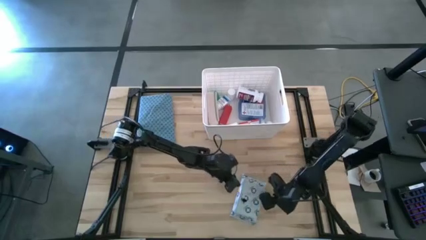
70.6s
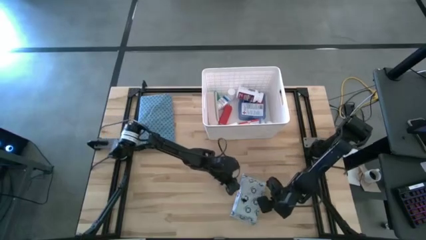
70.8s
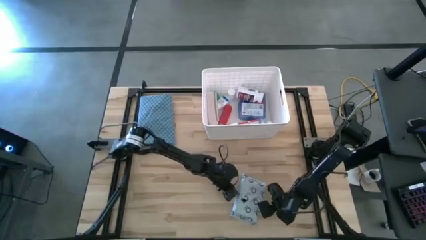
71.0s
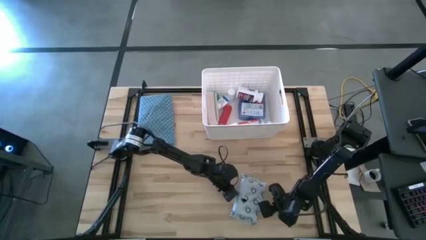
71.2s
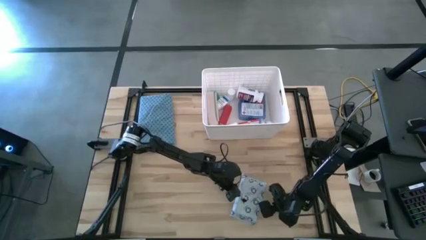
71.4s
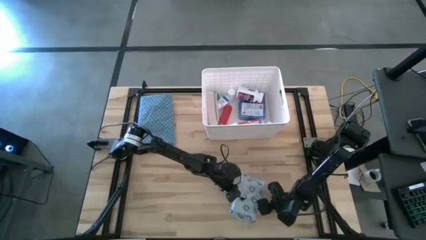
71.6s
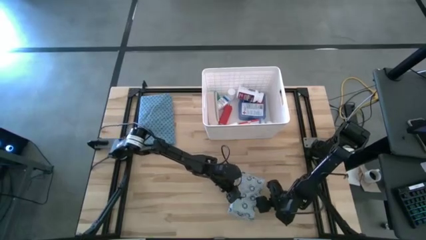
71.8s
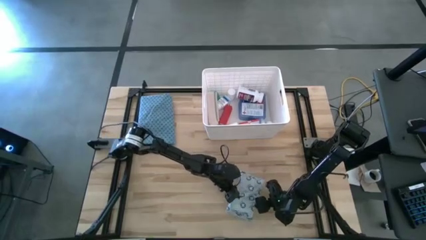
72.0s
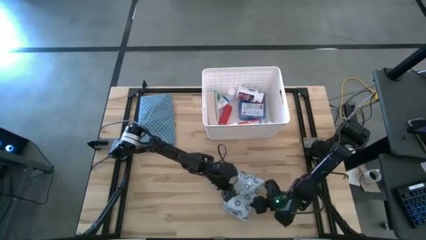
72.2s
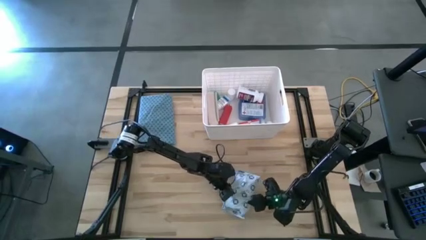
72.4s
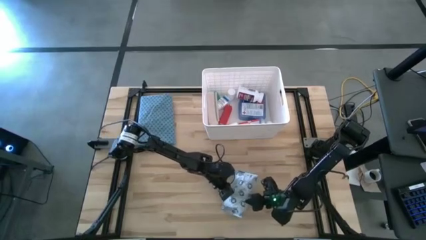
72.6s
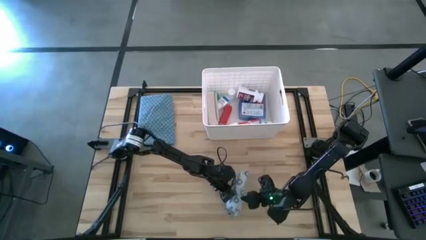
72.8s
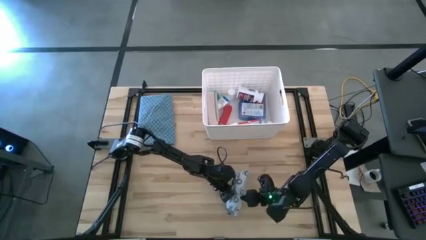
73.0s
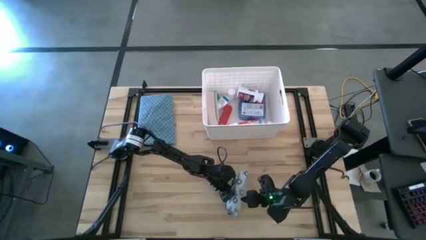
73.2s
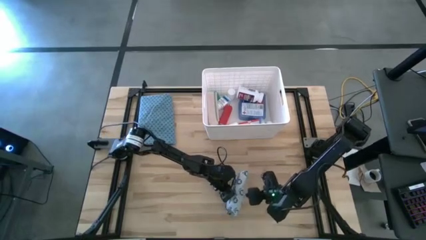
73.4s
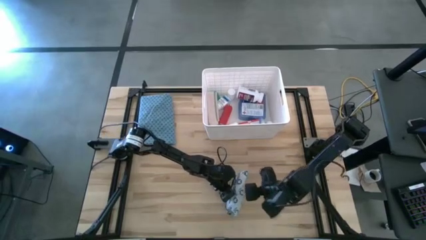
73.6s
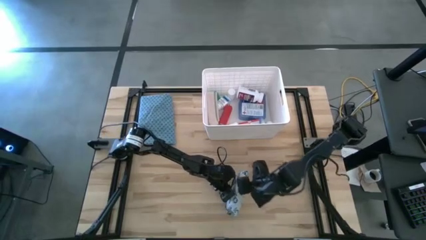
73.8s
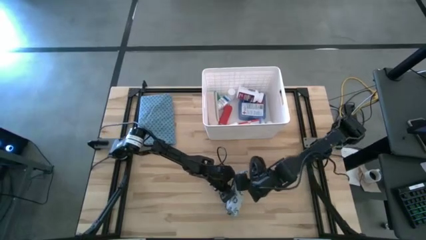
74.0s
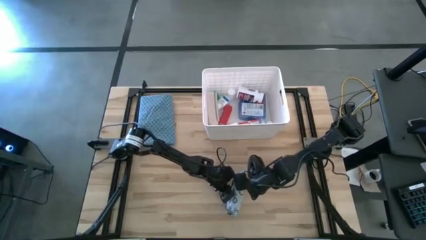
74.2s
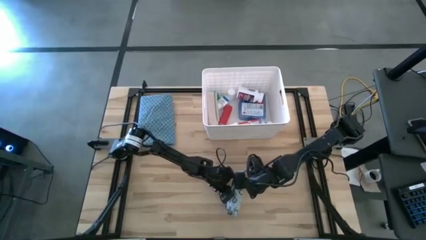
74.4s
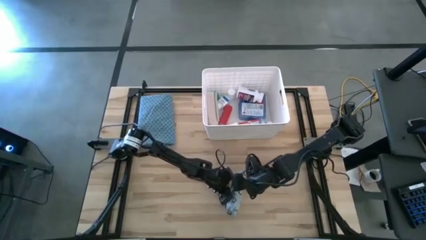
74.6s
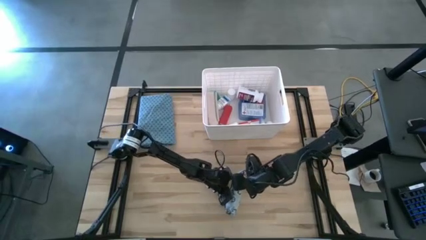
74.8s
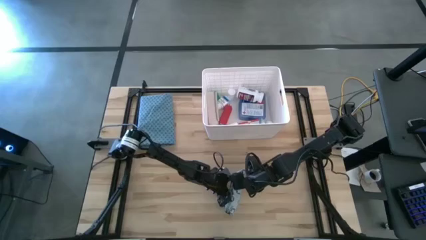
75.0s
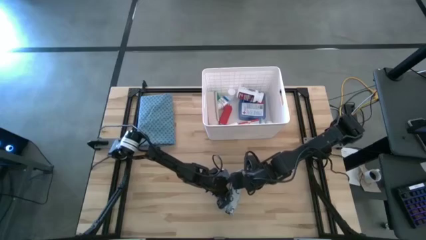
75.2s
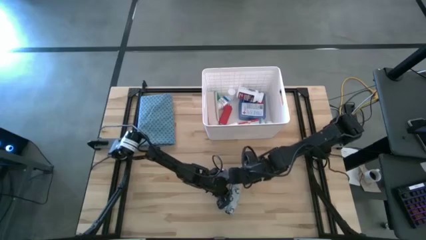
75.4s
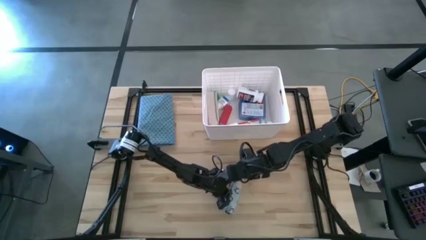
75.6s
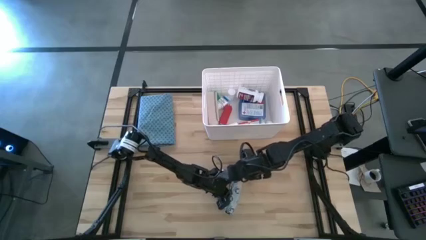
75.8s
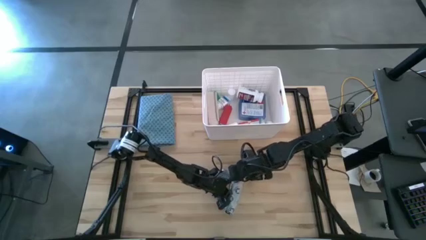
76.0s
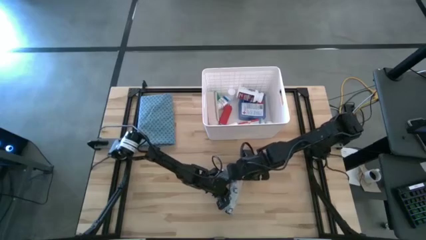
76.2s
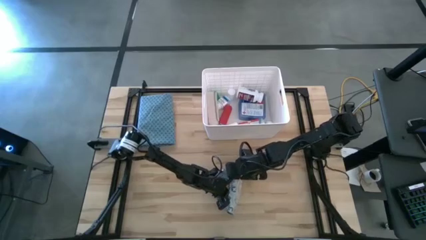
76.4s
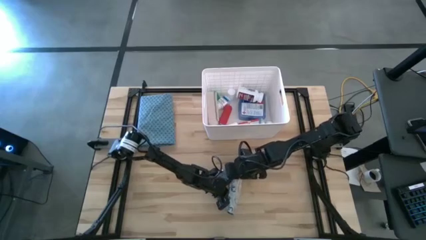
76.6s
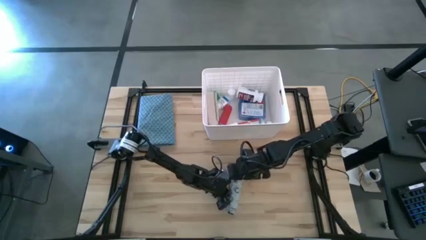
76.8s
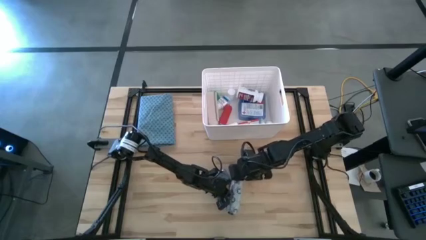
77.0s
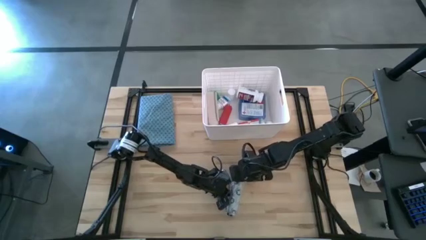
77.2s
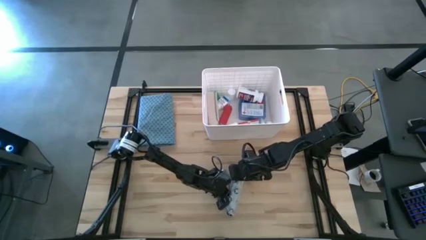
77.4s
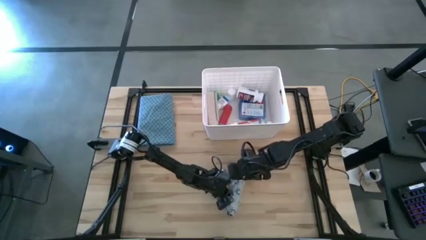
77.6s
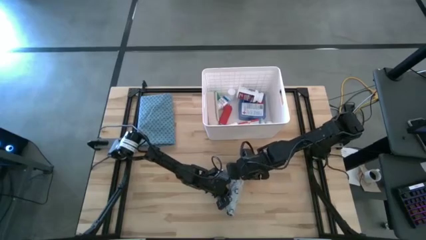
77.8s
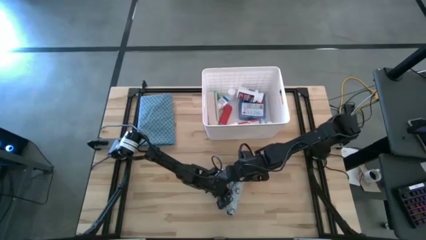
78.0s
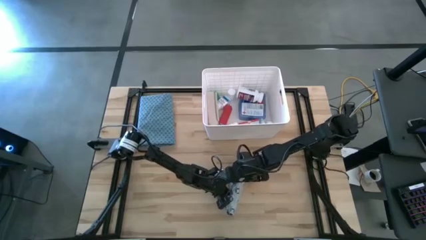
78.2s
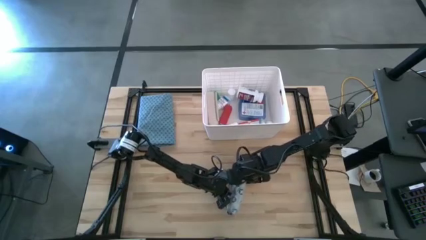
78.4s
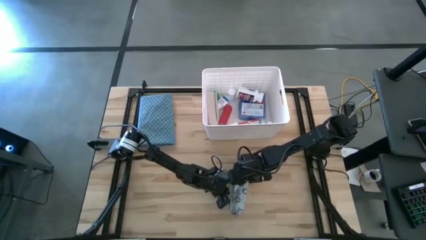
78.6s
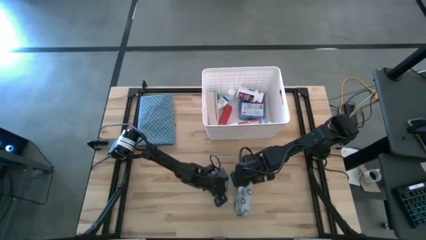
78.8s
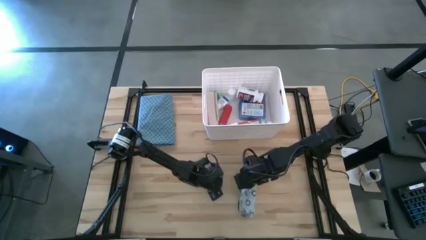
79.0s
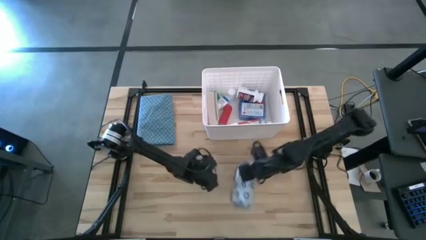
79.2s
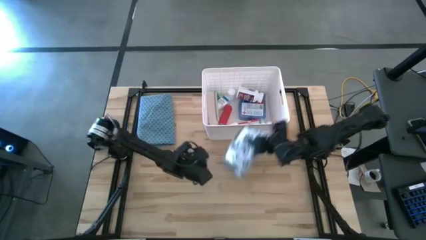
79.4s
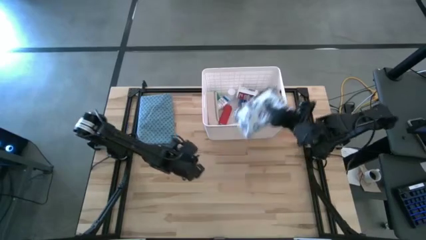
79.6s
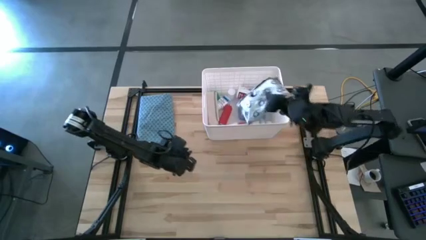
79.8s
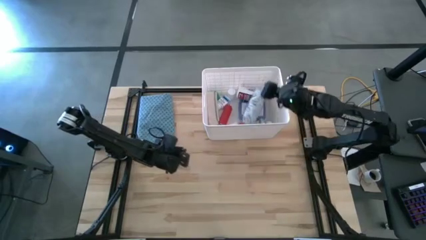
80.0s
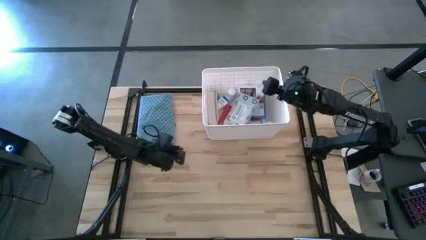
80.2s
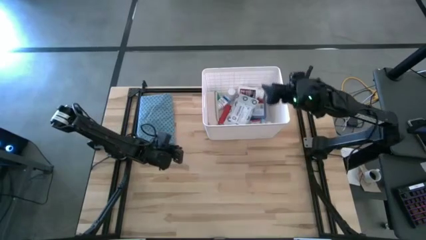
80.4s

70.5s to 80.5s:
Task: Pick & place medical supplies in basket/bin
Put the white mailer bag into the white bin

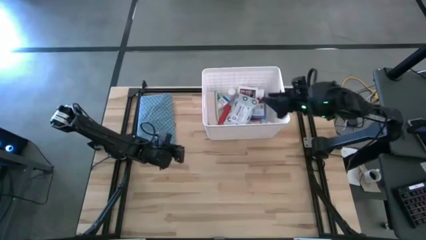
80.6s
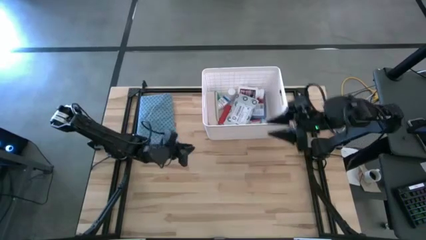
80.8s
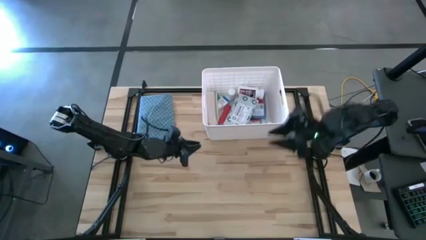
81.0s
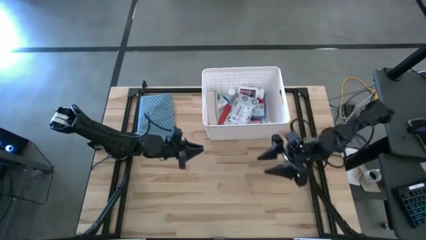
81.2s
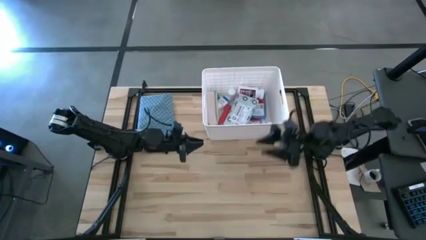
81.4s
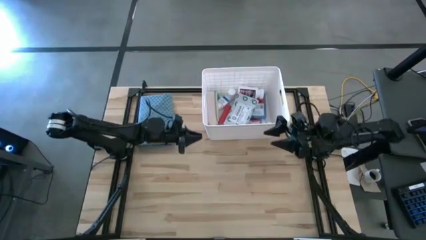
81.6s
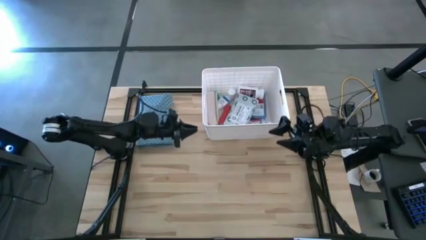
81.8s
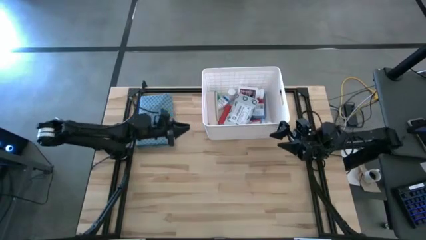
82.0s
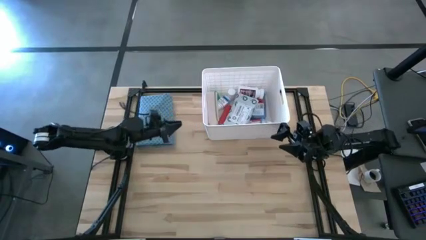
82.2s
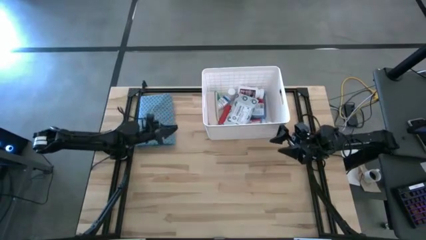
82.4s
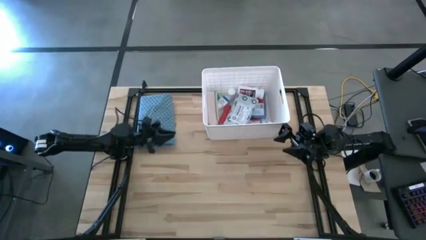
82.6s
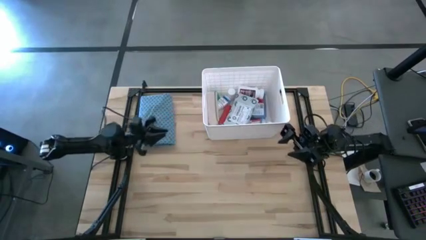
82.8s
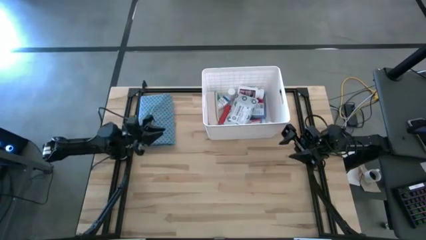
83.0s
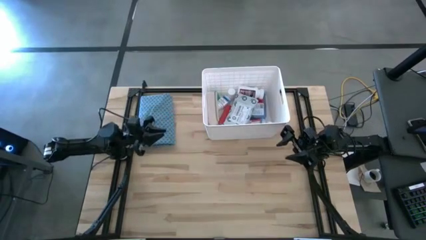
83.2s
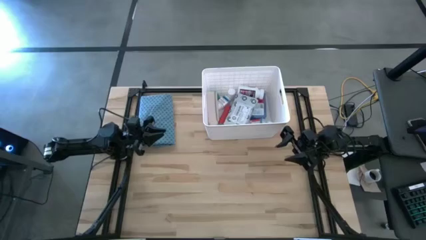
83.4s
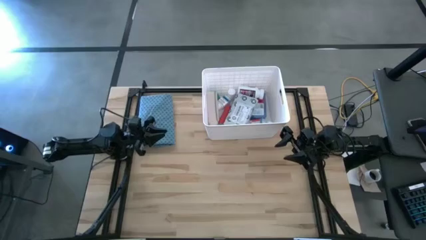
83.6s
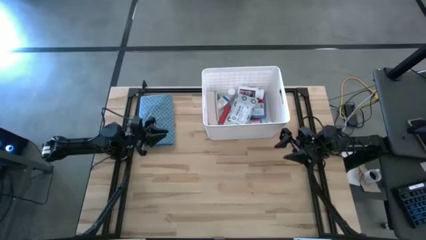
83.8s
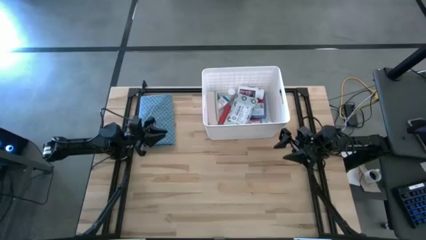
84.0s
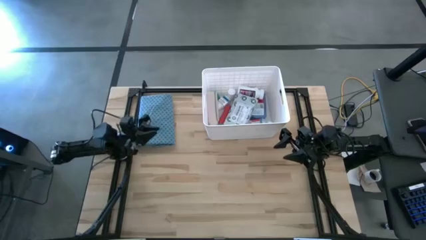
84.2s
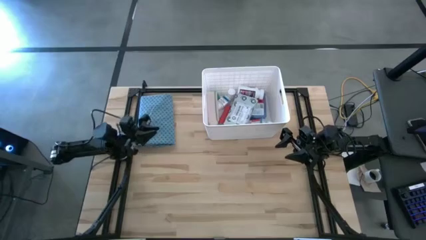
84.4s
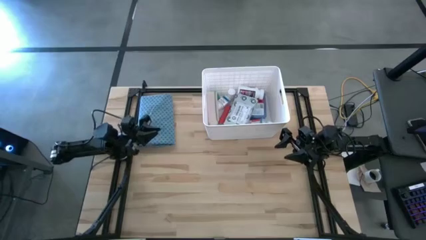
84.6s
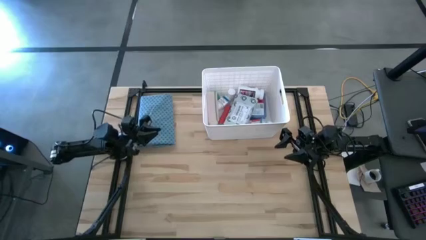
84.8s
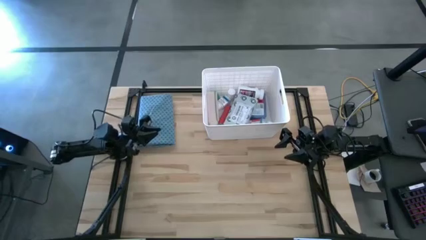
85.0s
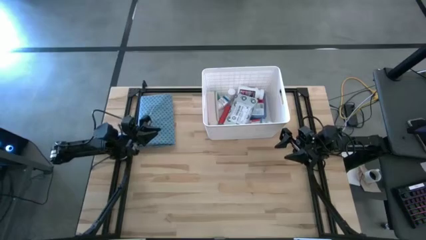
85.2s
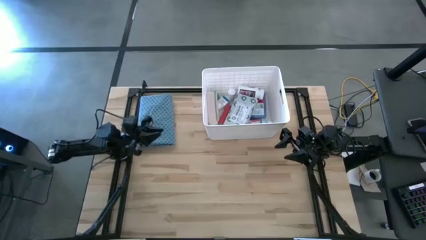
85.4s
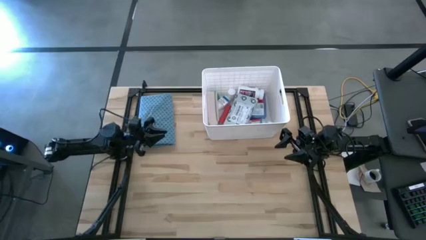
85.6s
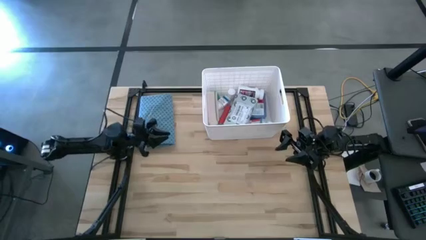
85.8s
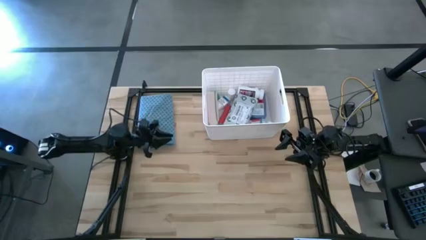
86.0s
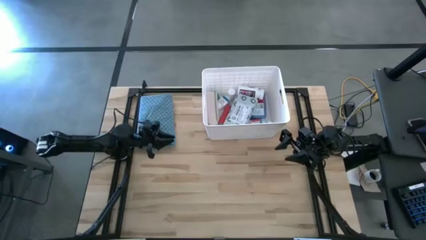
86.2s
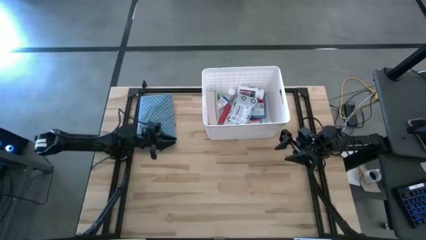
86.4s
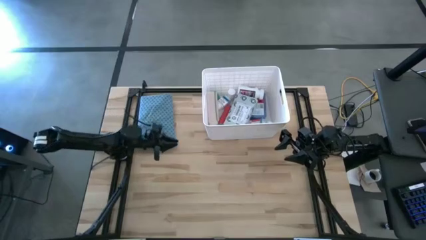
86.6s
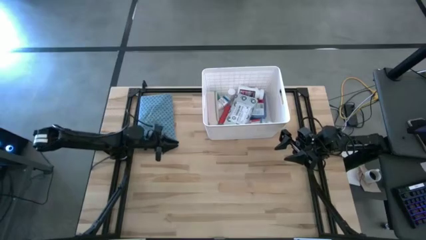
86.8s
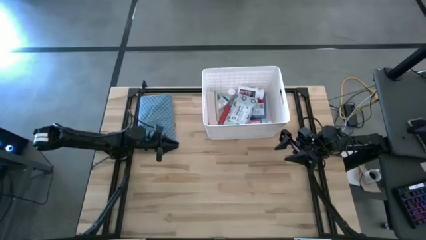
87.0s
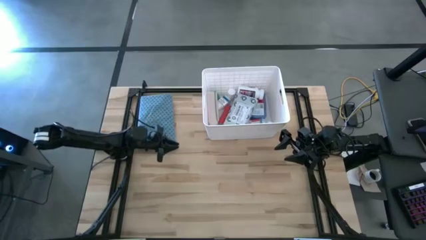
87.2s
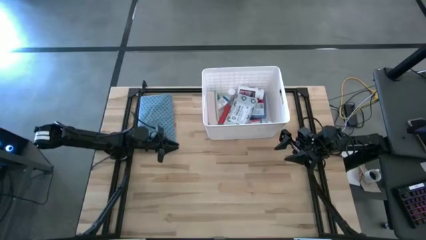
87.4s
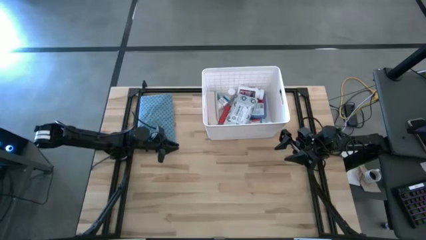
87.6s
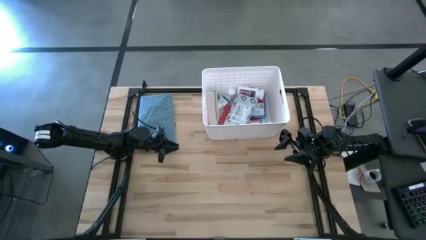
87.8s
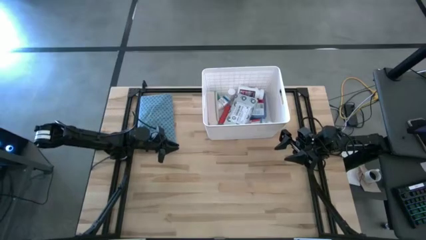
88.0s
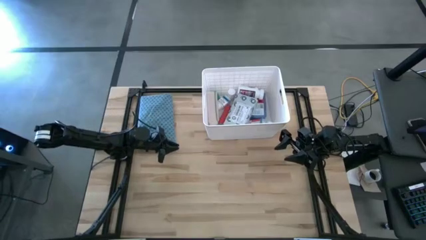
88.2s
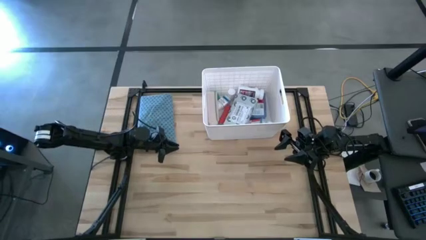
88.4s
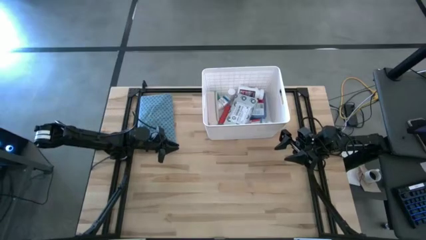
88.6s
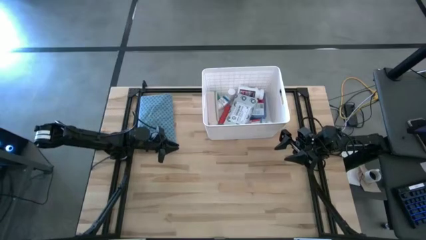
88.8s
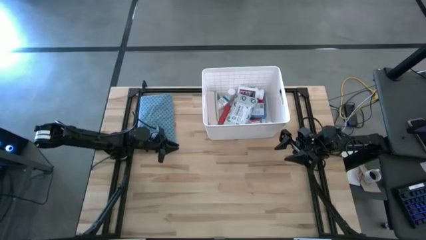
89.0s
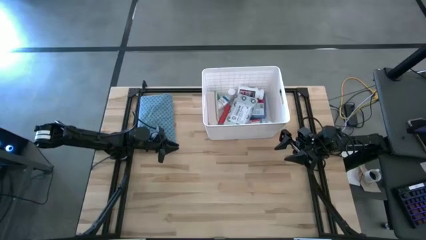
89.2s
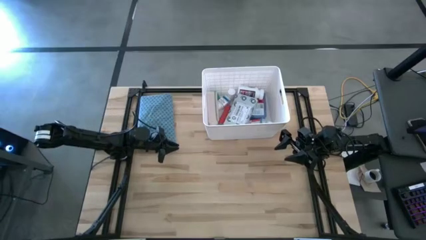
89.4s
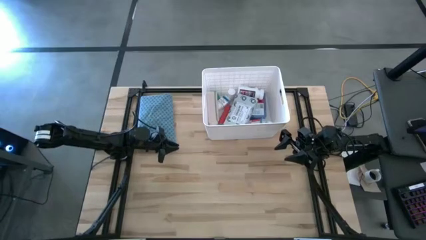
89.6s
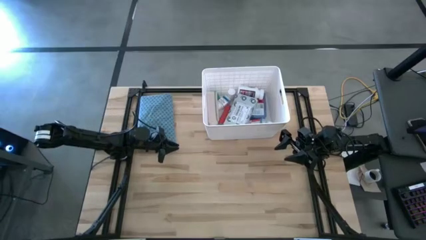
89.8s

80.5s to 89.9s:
Return To Home Position
